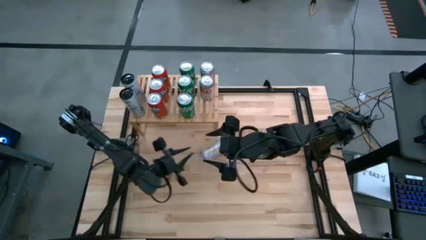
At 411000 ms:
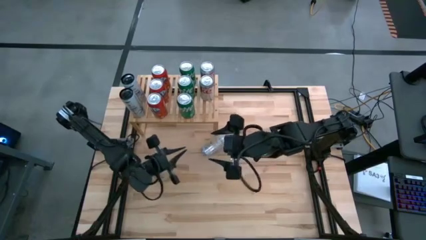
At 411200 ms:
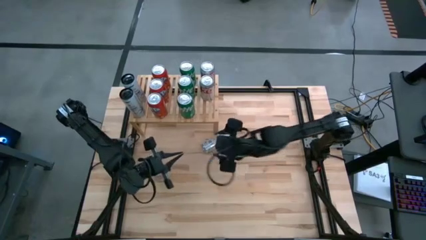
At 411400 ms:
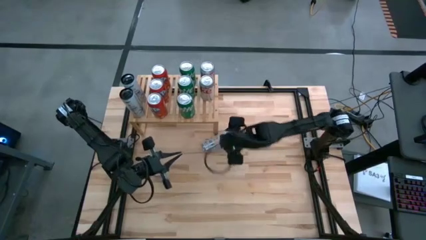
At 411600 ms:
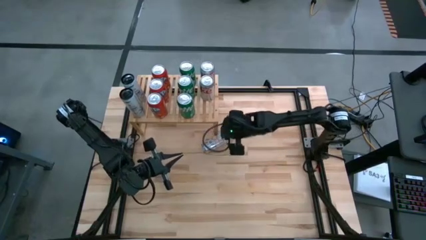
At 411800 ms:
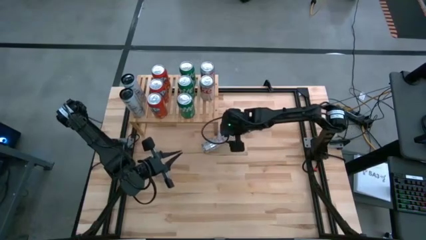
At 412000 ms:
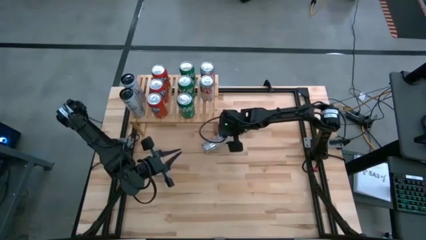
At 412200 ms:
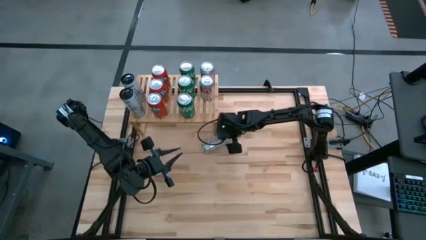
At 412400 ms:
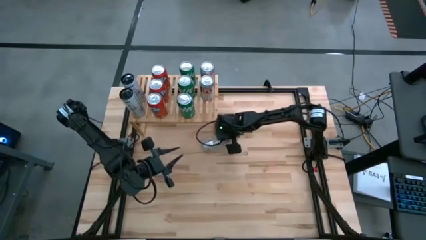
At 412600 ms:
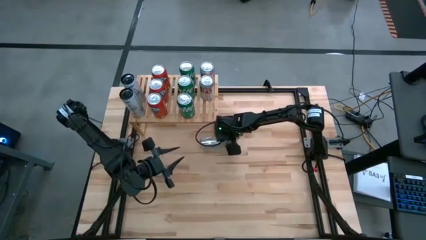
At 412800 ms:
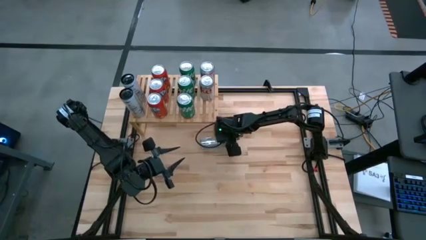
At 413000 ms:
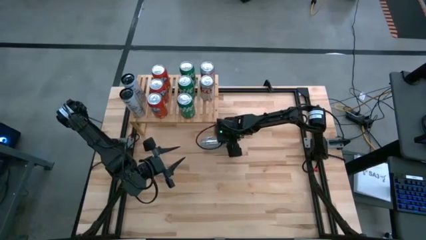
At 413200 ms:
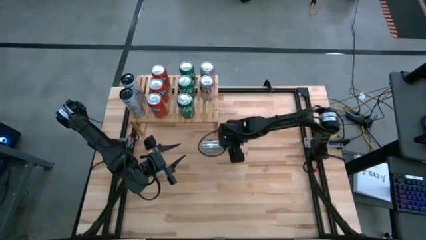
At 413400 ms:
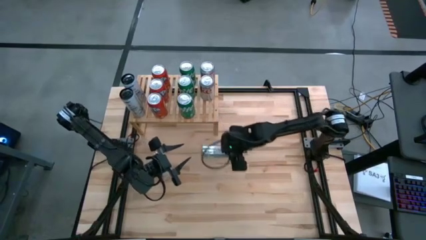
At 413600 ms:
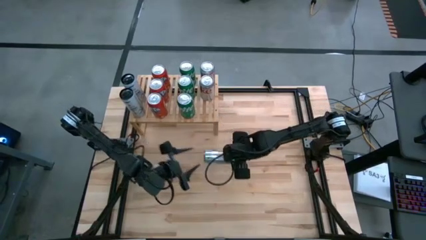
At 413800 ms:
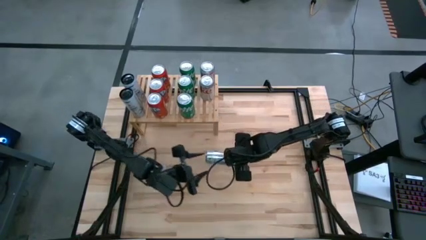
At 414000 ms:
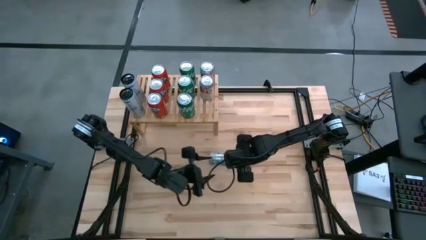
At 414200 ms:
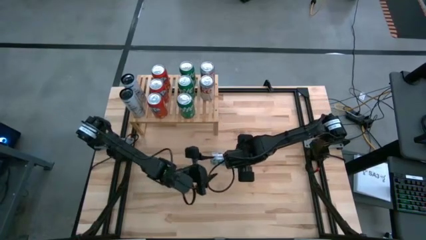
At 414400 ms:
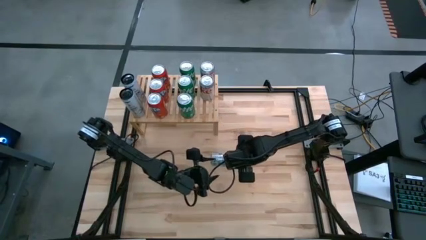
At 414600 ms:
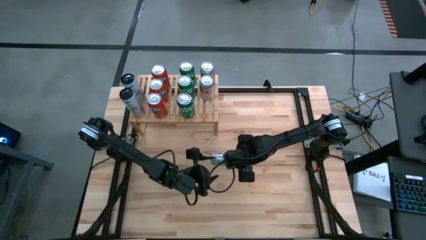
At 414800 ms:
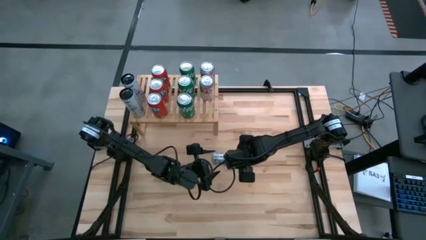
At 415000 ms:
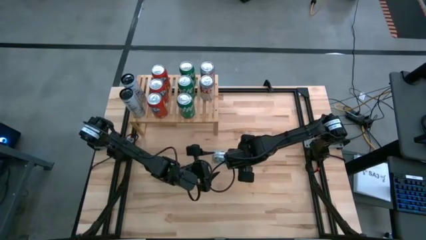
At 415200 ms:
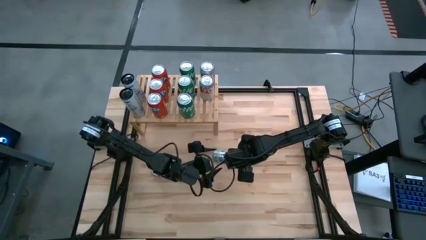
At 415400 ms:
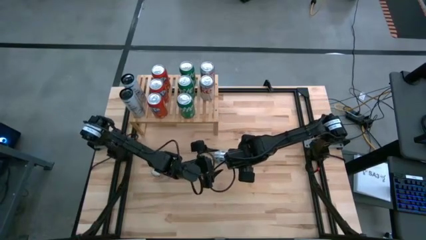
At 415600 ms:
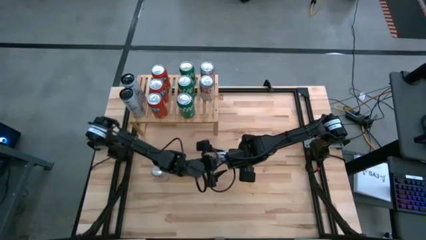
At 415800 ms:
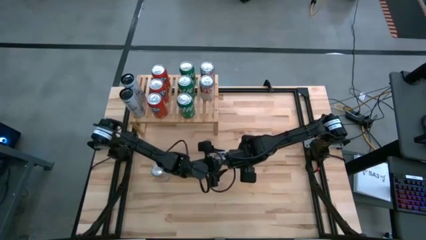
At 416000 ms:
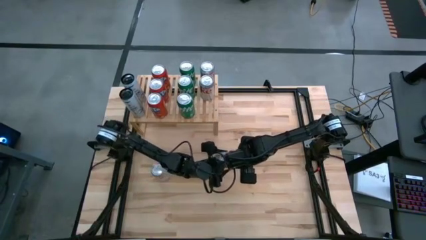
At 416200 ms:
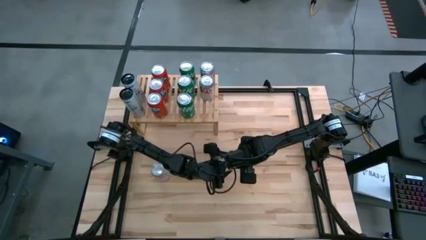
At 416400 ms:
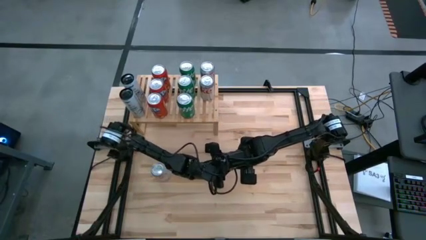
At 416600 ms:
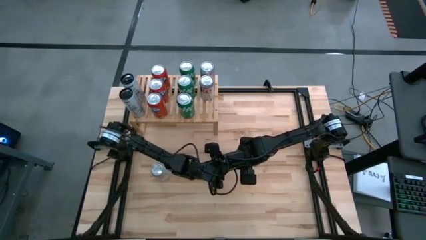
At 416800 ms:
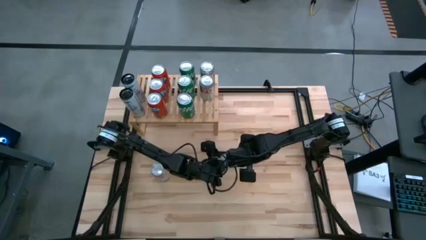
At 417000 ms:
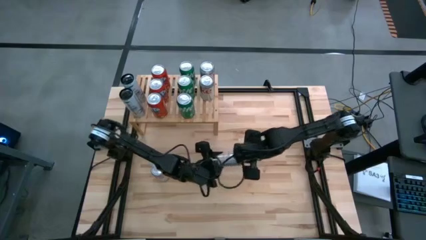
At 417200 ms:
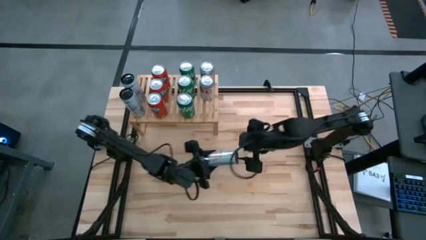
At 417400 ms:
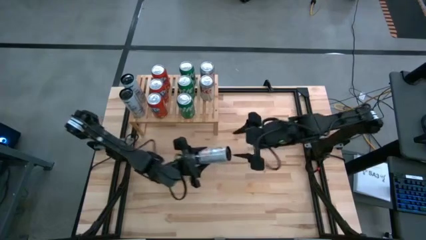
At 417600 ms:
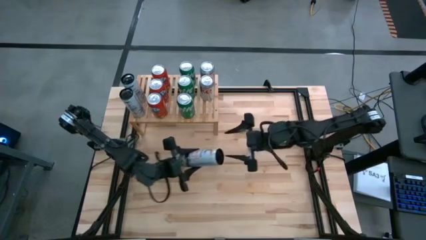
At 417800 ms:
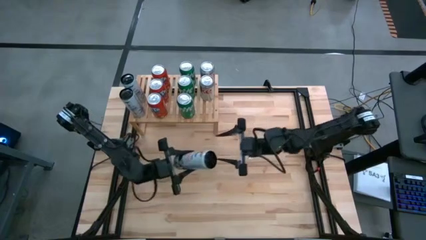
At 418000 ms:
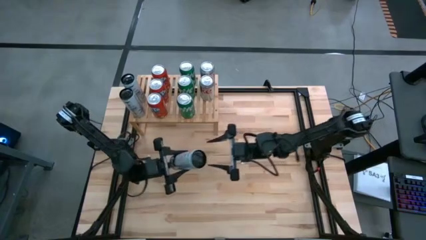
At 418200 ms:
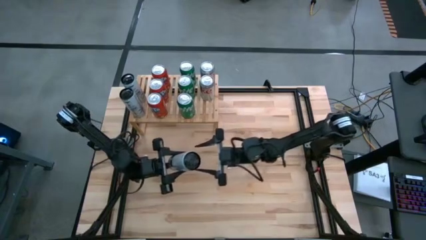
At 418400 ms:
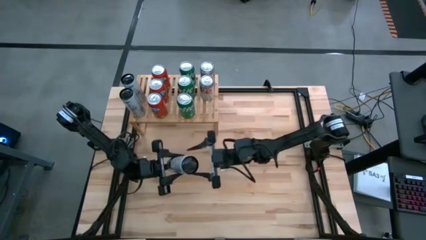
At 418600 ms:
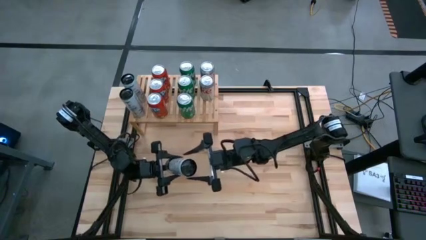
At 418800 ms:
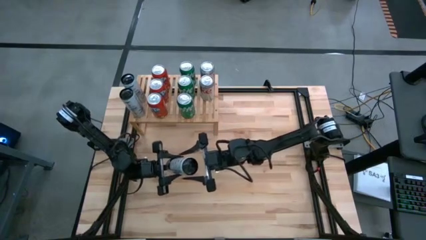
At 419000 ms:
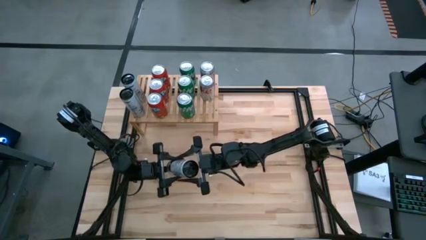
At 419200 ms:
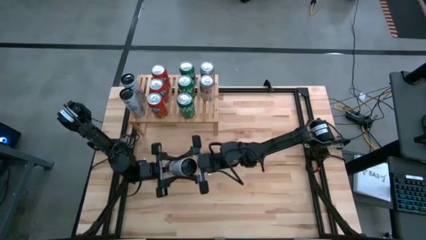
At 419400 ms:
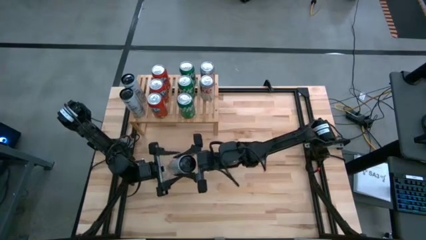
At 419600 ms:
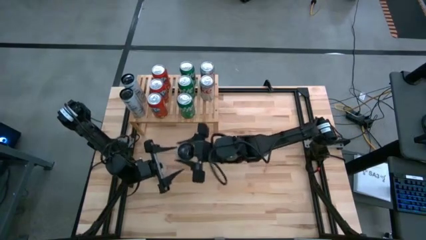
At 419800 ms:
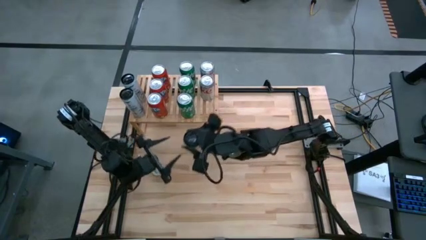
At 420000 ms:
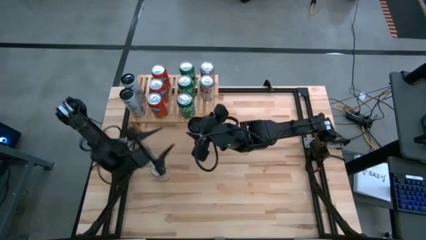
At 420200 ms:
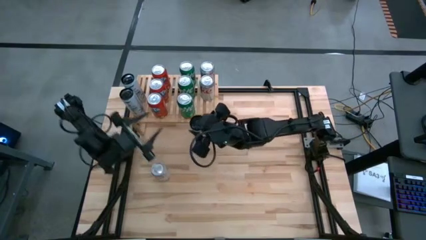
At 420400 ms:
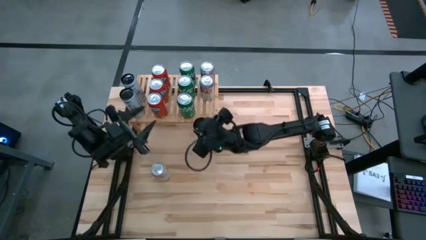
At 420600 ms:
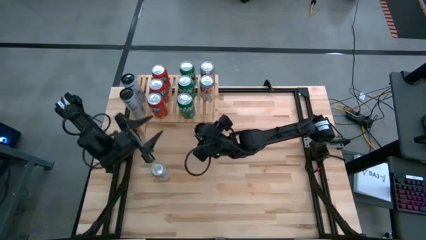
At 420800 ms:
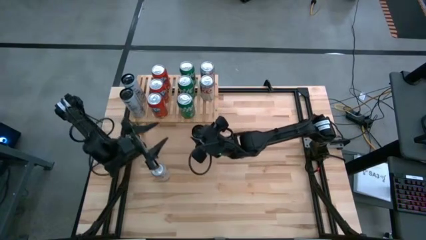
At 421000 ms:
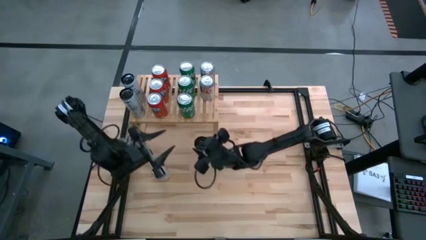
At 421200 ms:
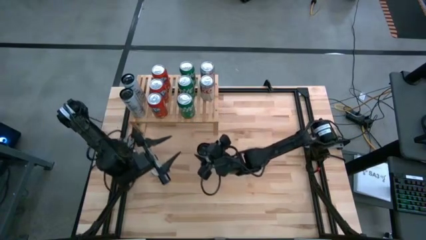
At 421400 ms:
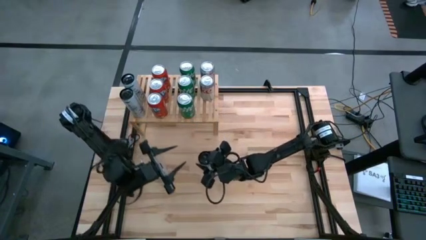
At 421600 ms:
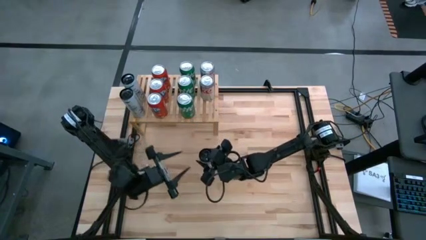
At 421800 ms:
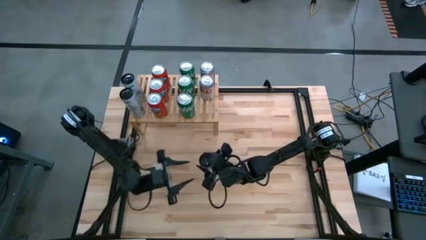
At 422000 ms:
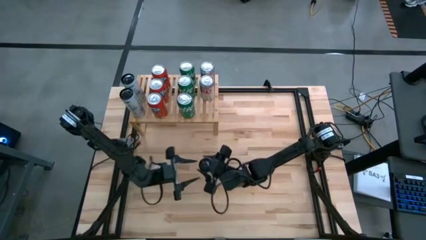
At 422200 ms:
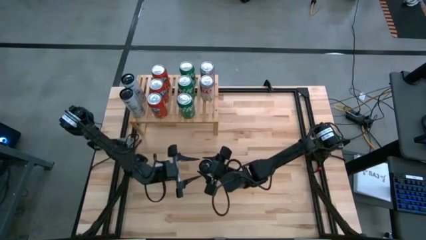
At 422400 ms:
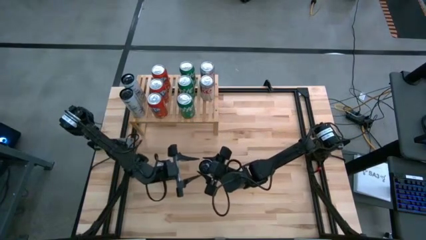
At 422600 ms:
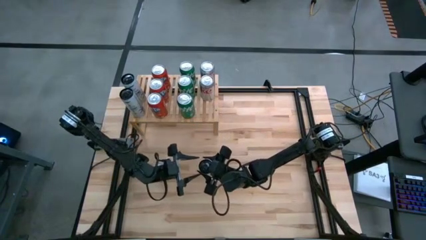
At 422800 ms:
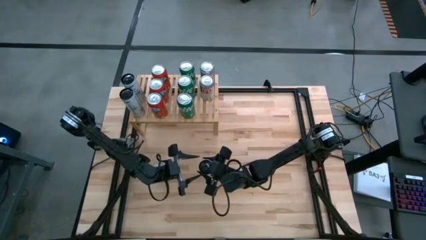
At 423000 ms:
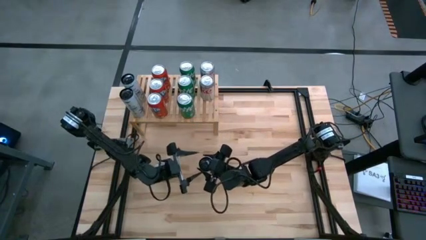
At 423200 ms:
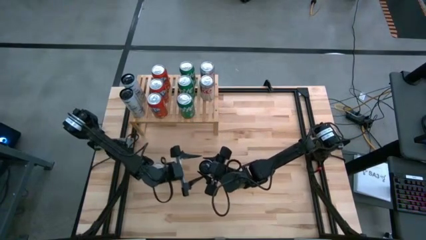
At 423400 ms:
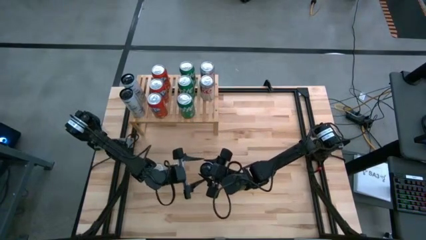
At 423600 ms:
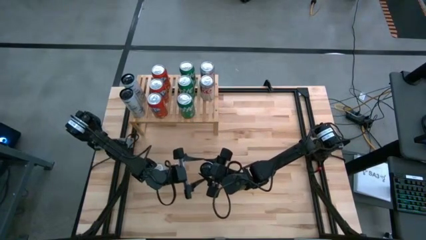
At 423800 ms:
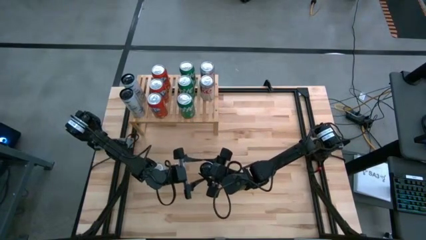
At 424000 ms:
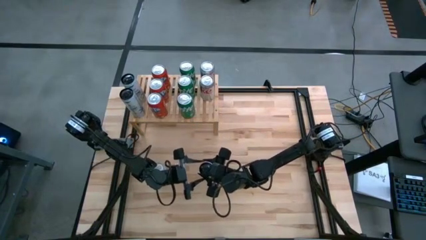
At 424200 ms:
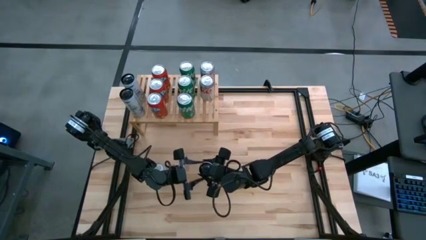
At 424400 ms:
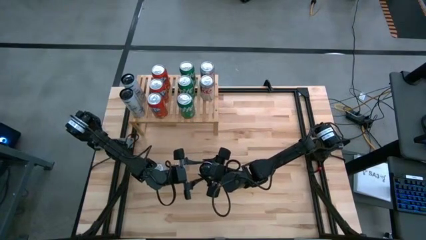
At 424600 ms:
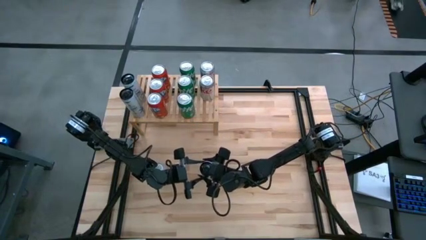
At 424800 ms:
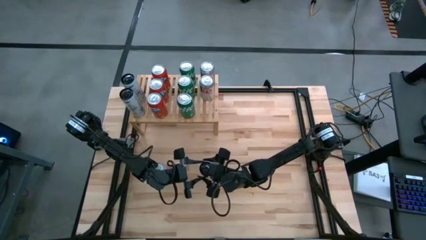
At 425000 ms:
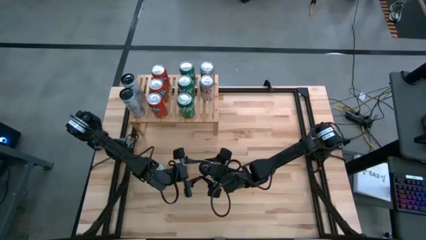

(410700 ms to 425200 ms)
Task: Place canned beverage on shelf
Put the white and yellow soda can on the shelf aligned with the other white and yellow soda can

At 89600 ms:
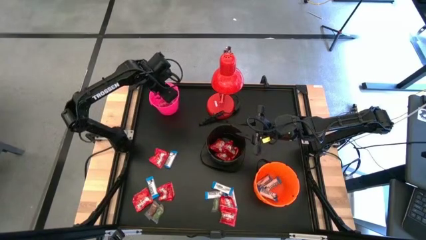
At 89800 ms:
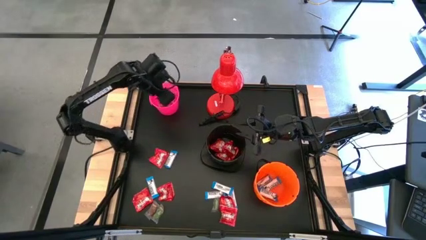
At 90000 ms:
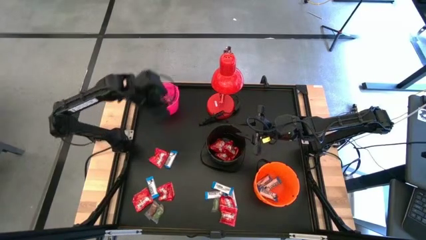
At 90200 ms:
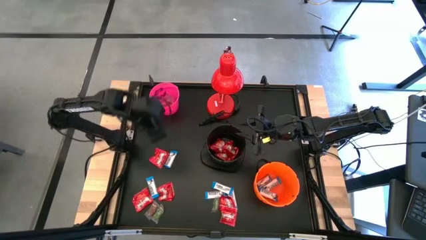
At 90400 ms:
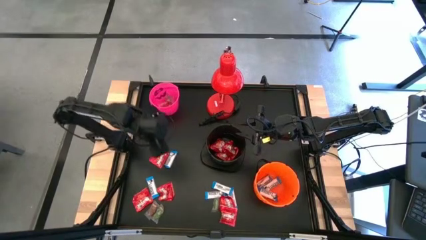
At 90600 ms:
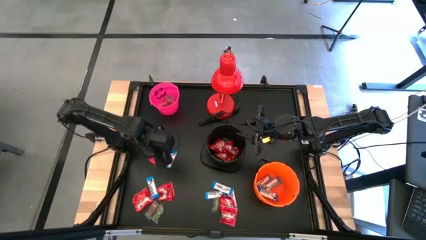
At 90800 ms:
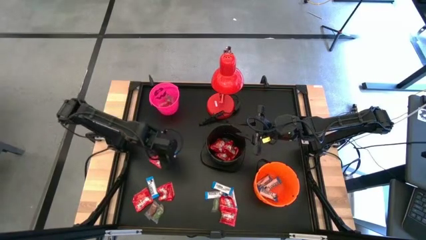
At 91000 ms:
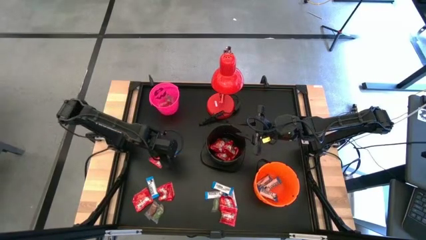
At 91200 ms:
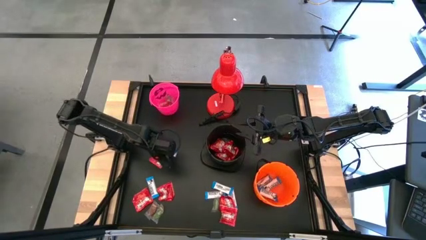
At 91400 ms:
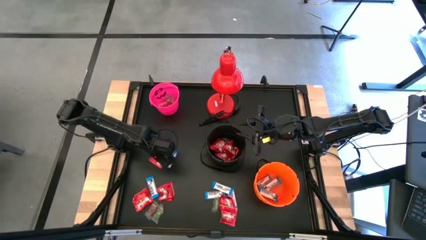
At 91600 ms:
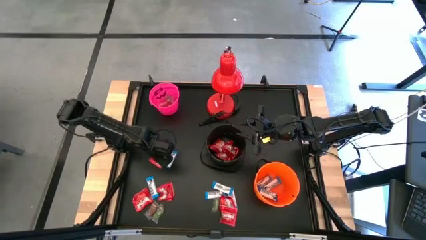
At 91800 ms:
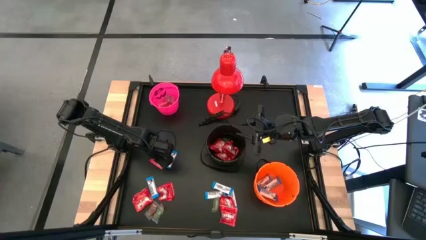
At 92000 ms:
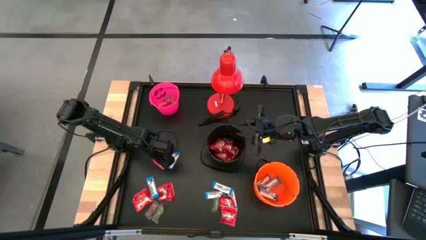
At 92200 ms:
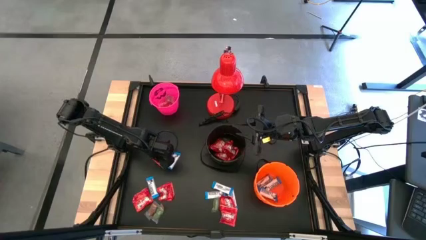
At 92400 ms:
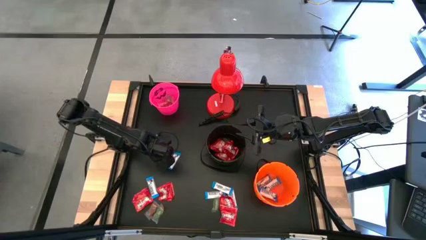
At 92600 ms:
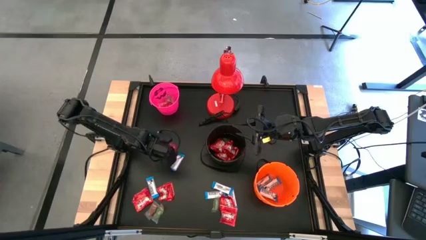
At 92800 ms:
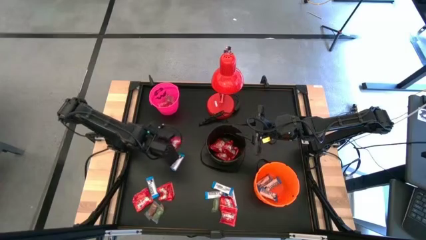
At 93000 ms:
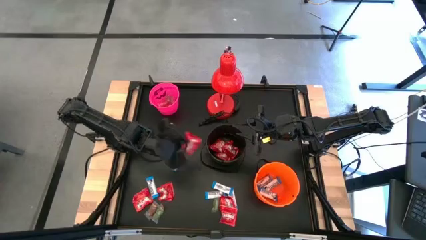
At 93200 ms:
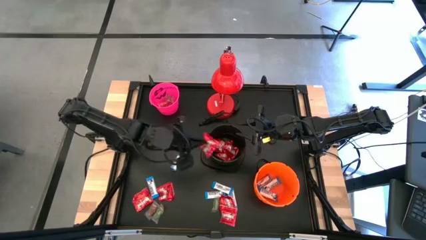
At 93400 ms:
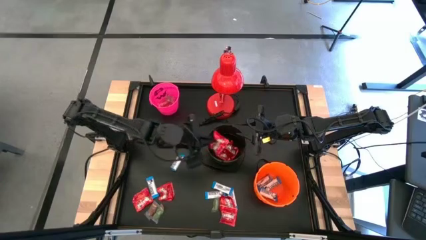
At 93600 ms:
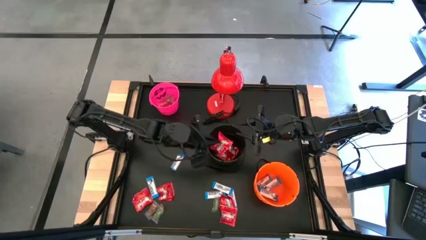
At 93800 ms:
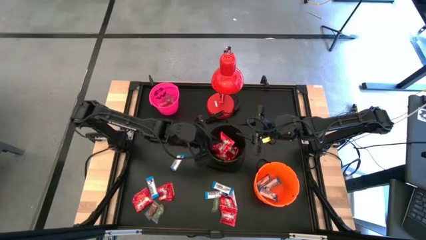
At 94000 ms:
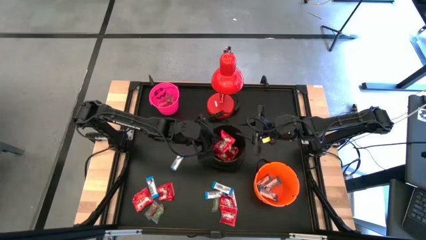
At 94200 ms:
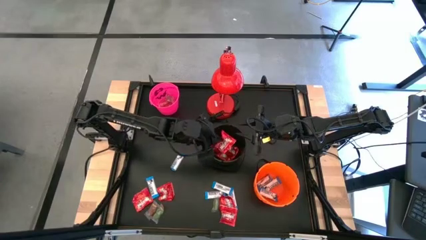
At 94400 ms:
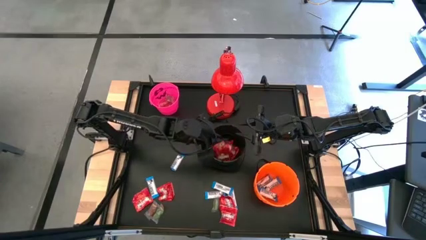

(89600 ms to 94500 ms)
Task: Organize candy in baskets
Put the red candy into the black bucket
